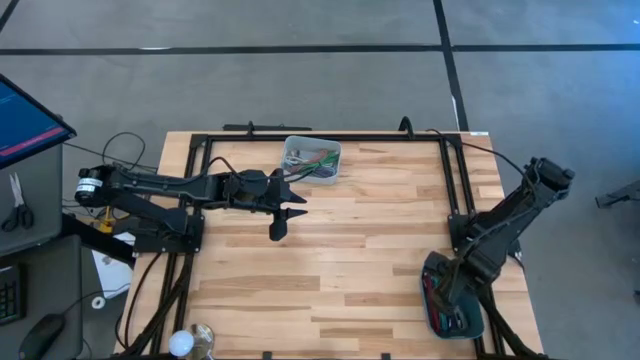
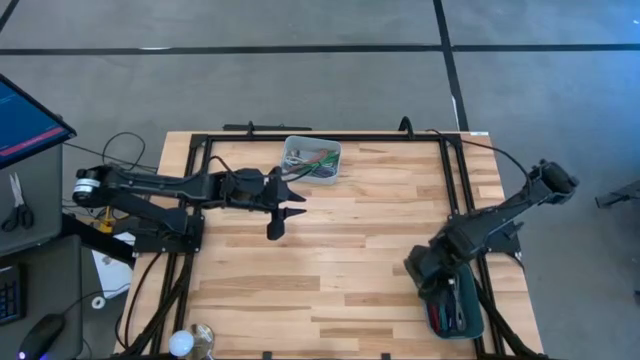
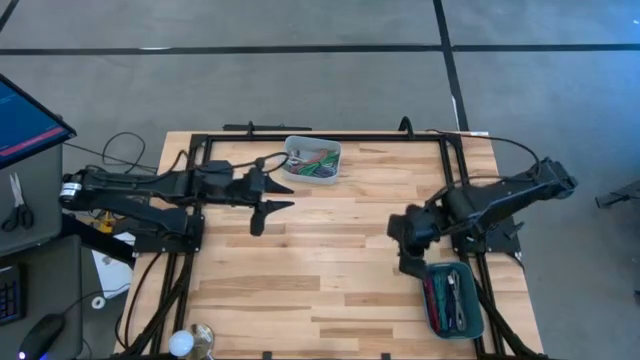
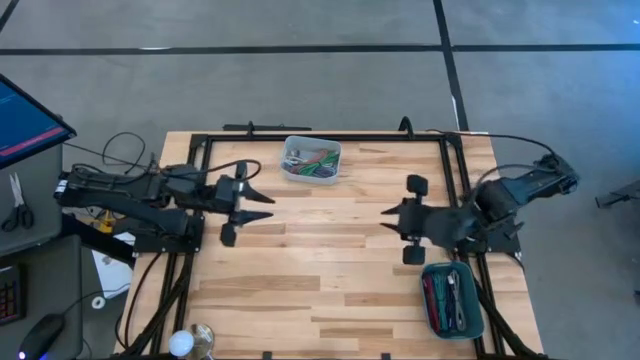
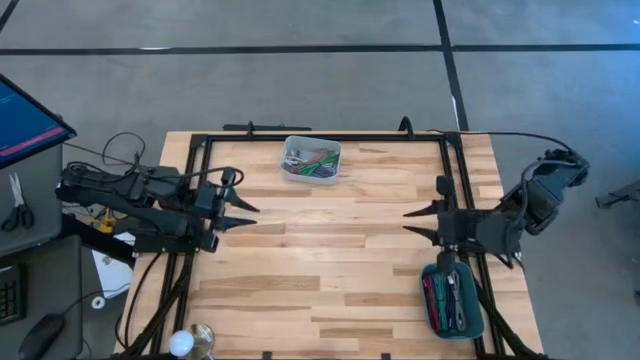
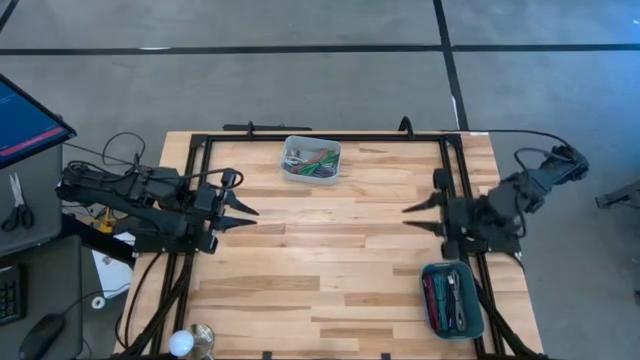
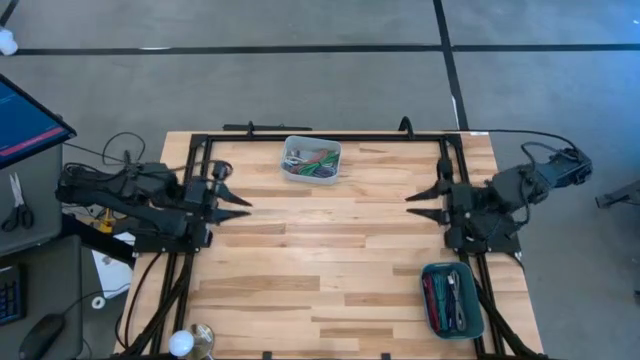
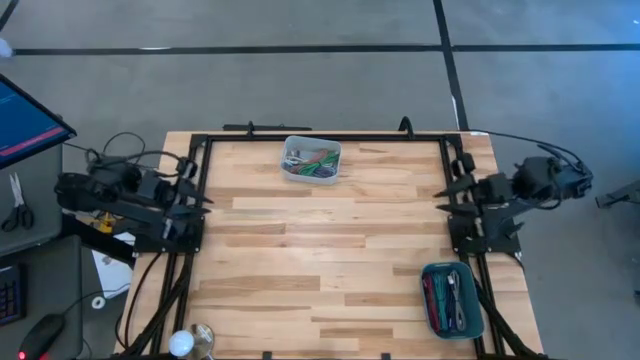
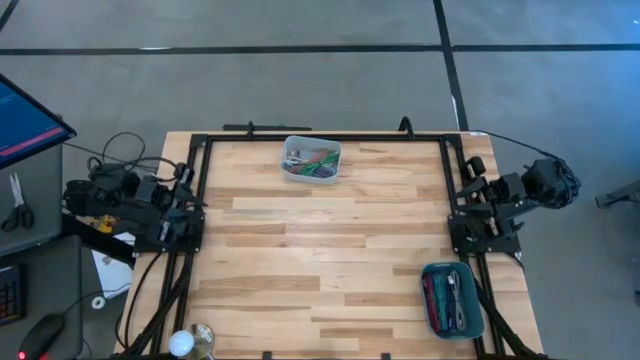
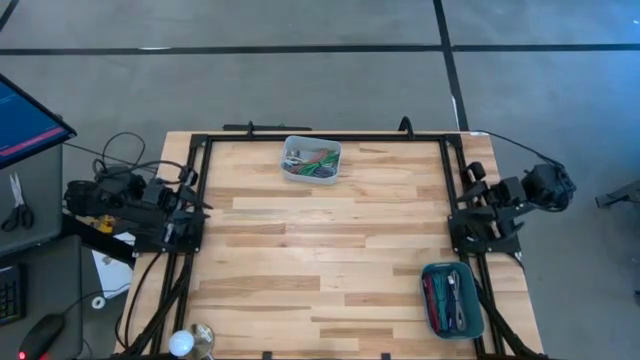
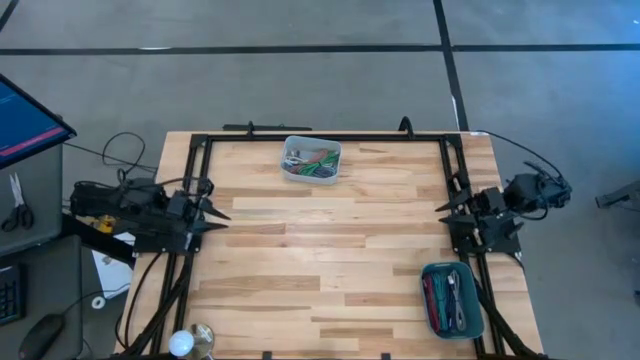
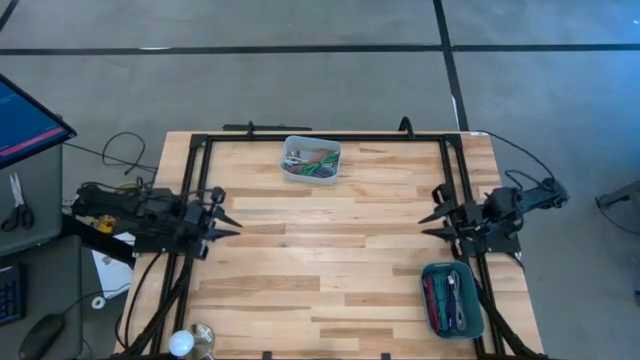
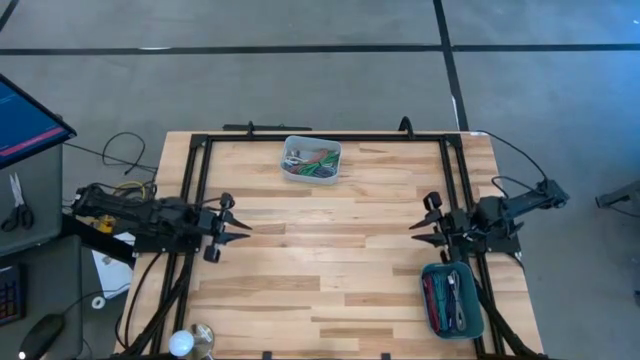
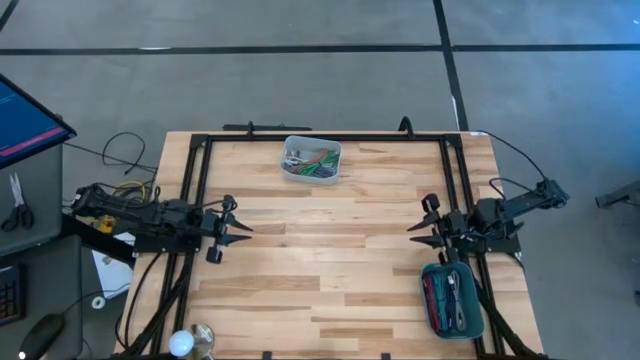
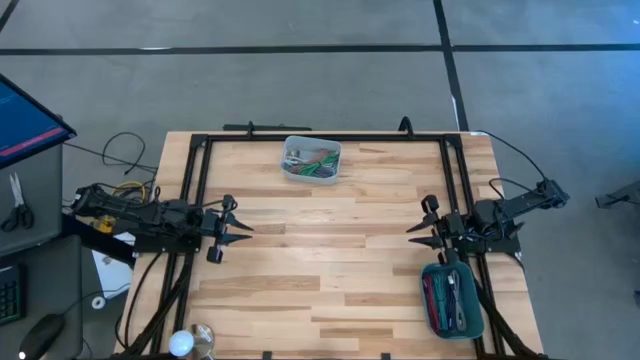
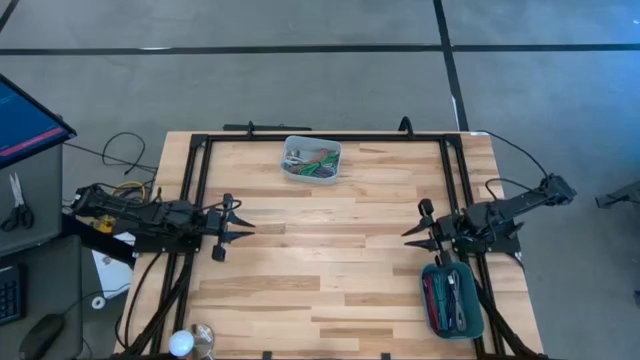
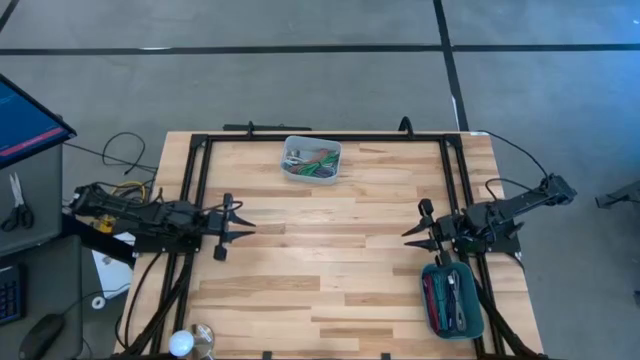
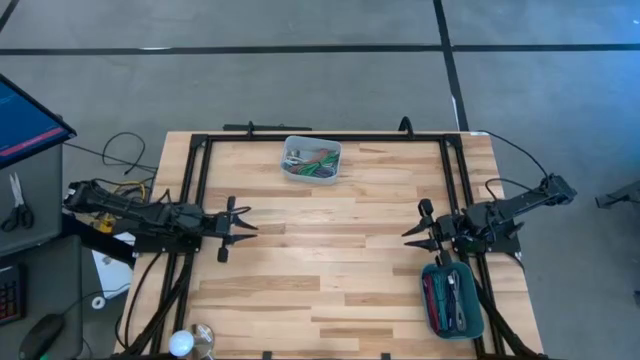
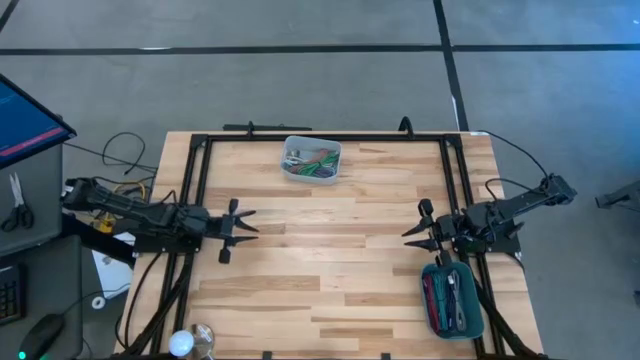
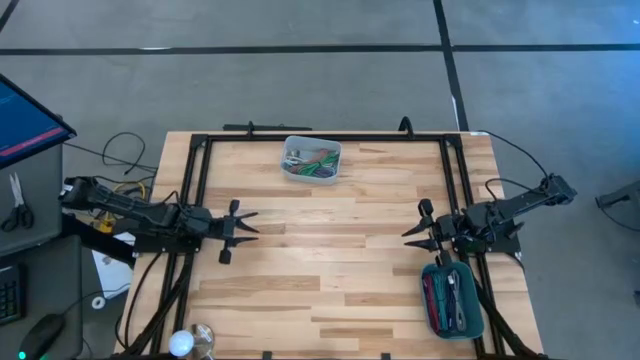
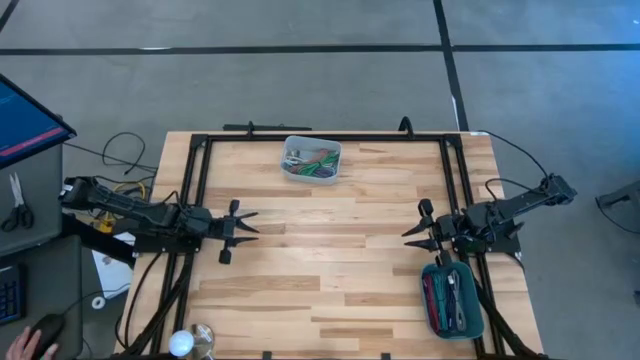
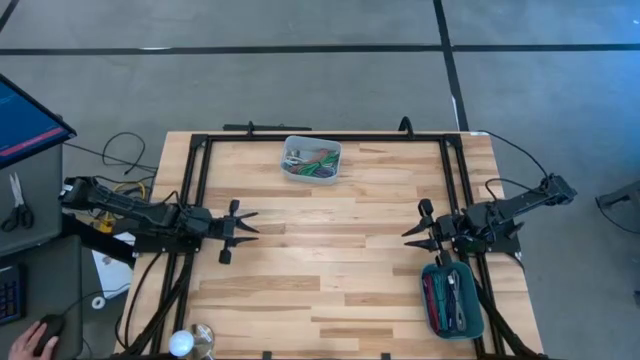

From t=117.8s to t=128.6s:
Task: Pick & Place USB Port
Return to Home Position

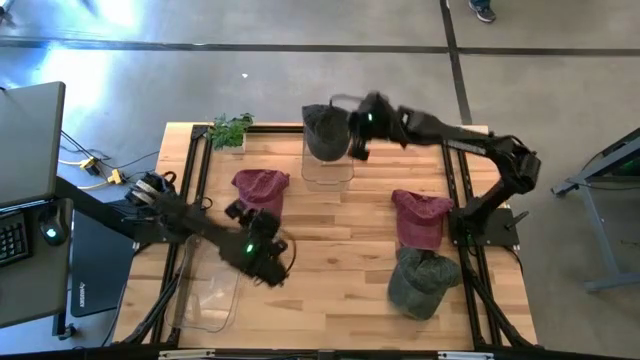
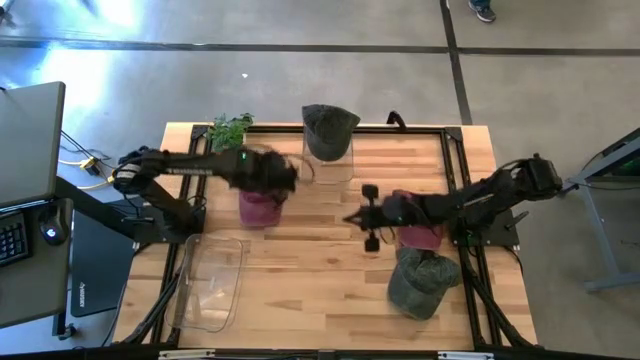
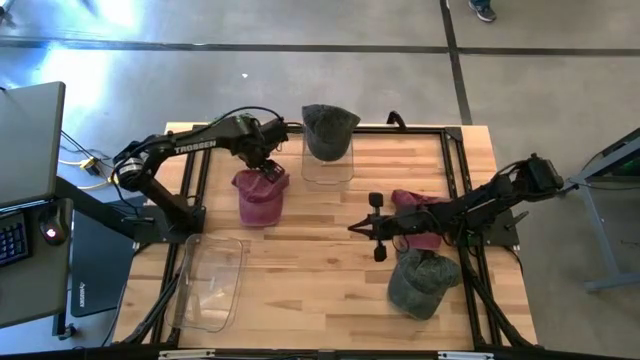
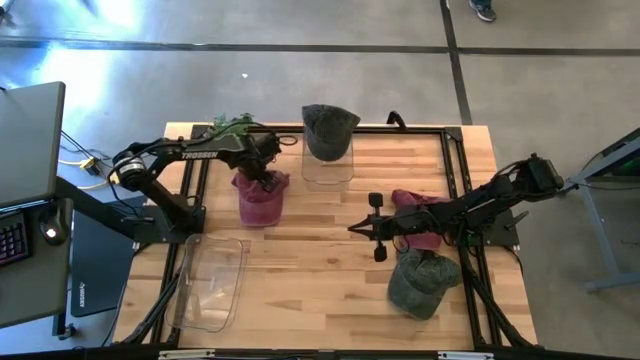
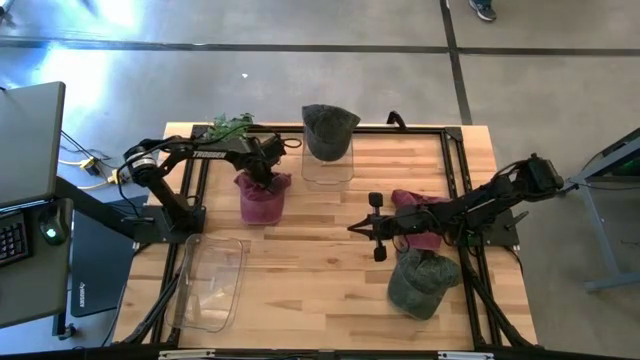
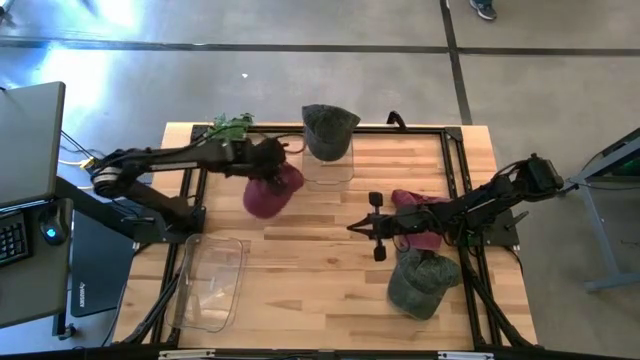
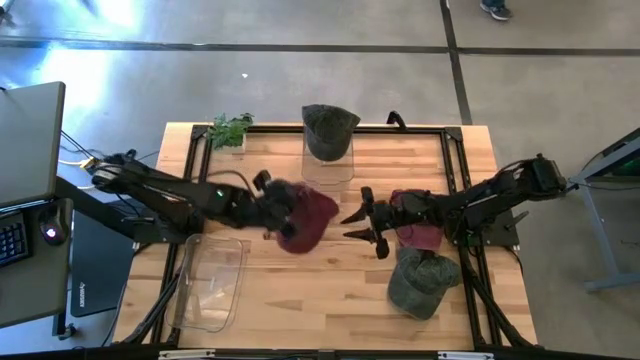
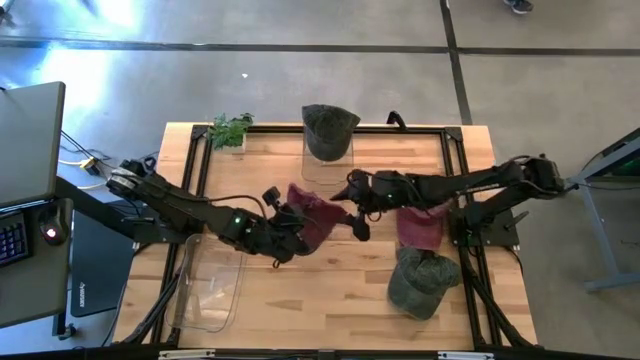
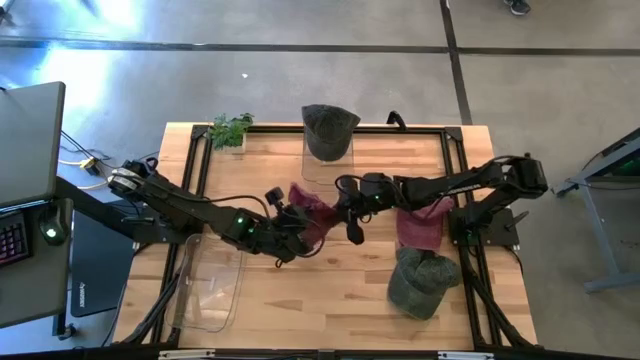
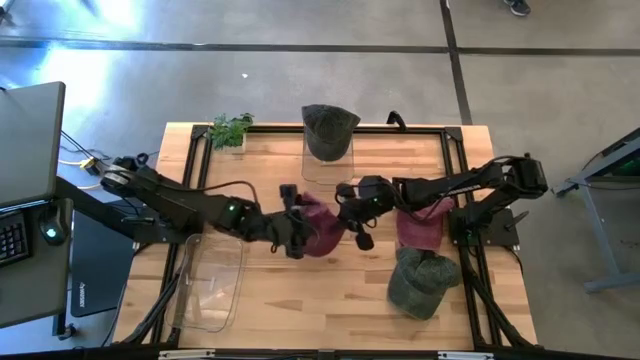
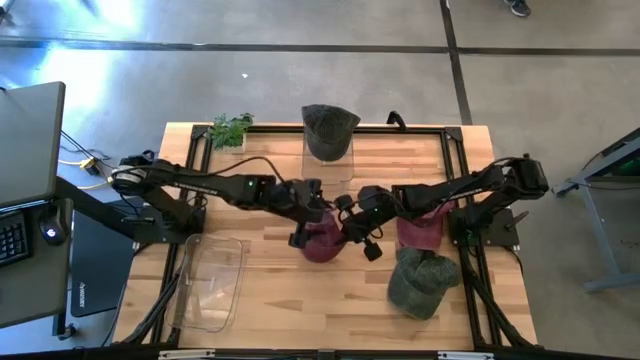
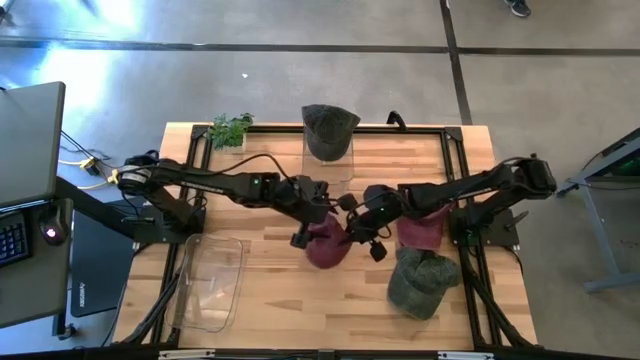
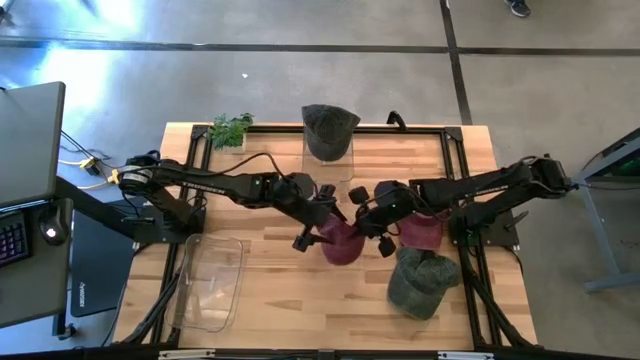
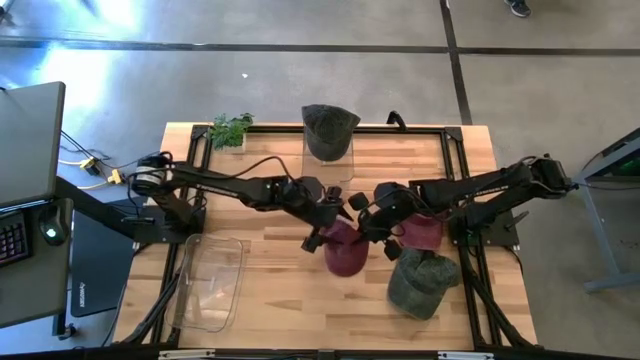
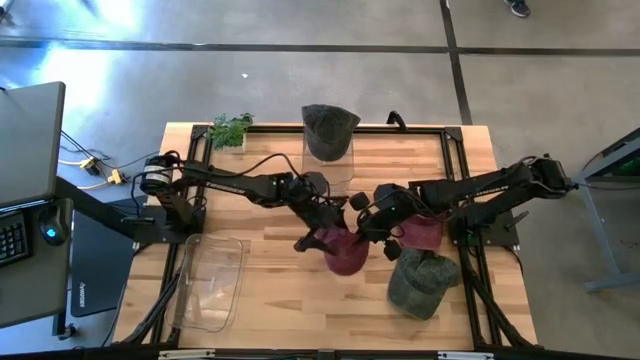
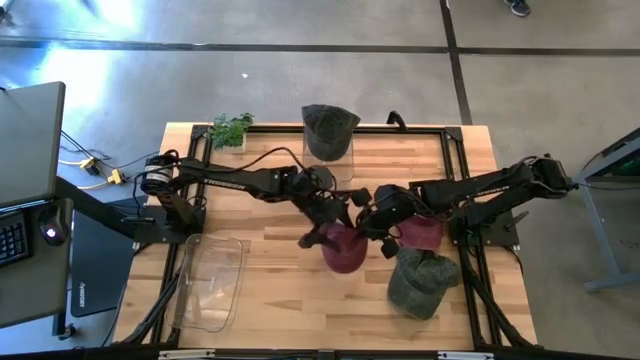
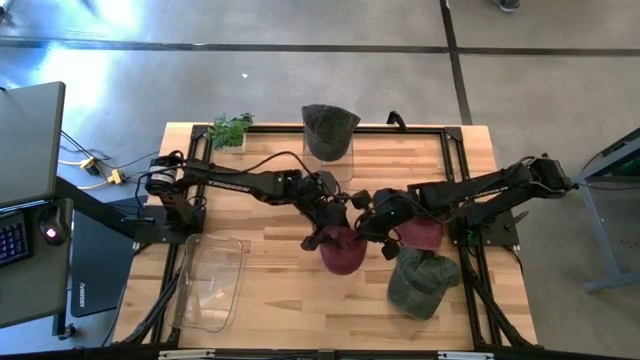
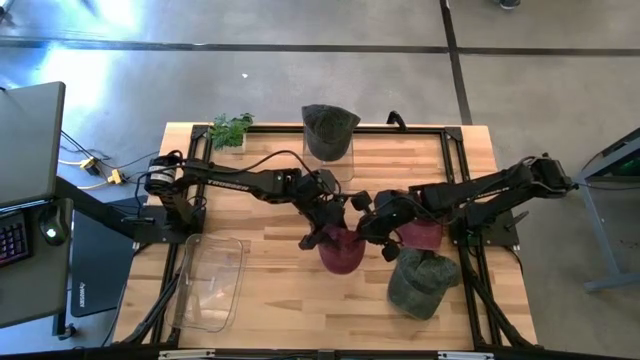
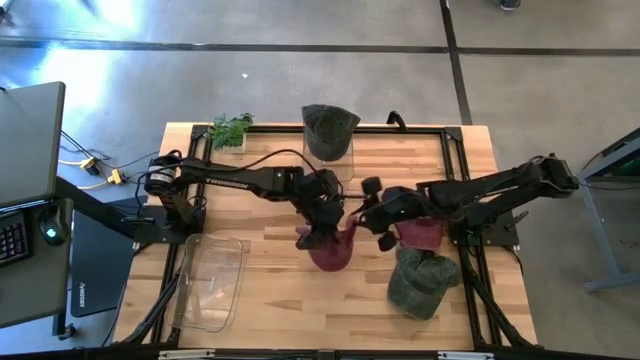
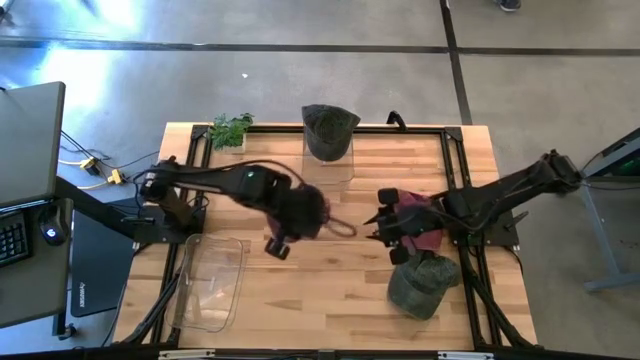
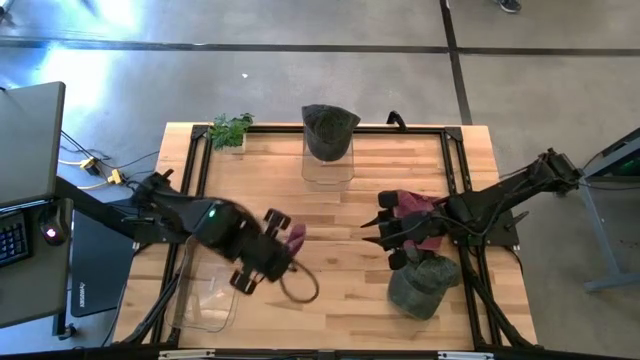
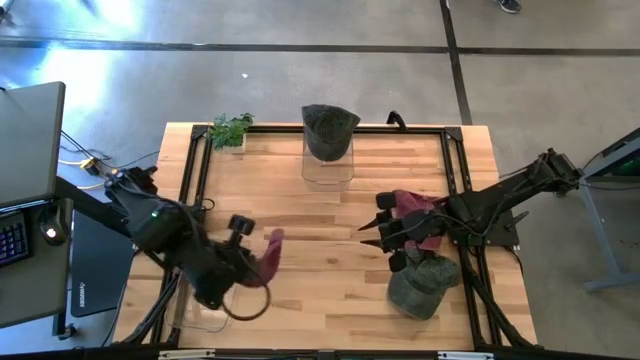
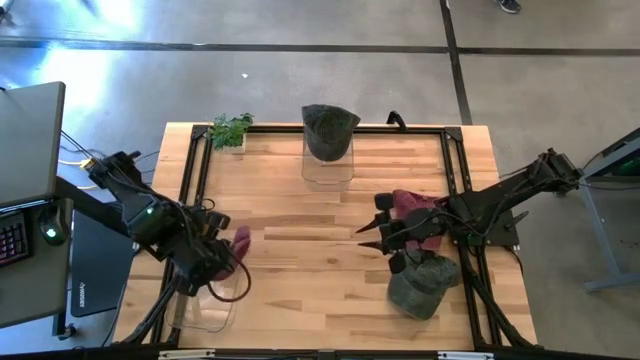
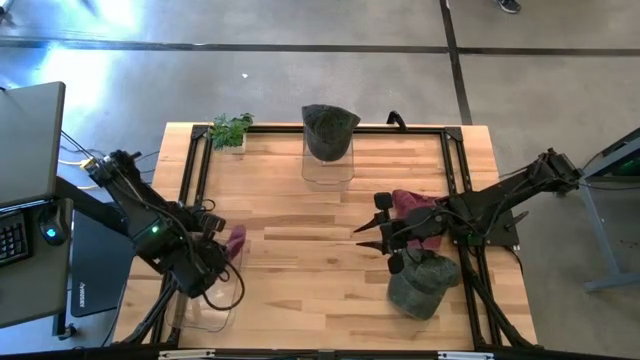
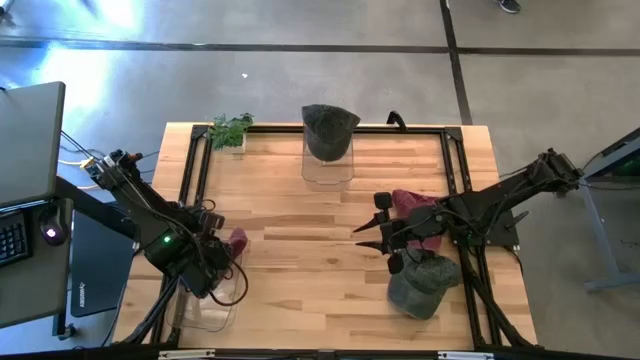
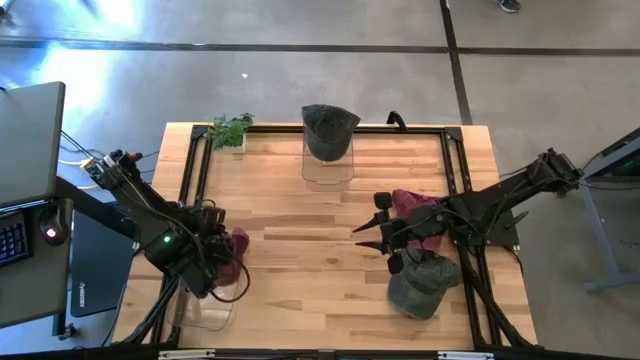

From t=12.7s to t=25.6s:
Task: Pick & Place hat
Put the left red cap into the bottom transparent bin
